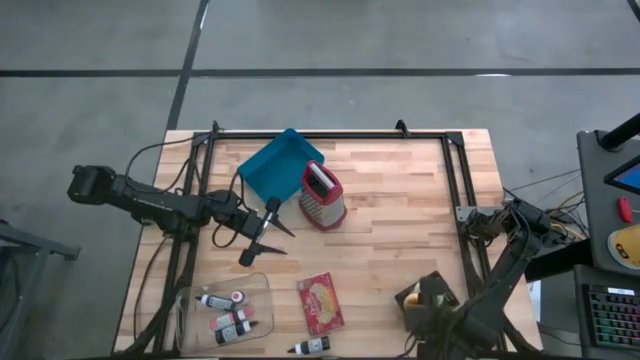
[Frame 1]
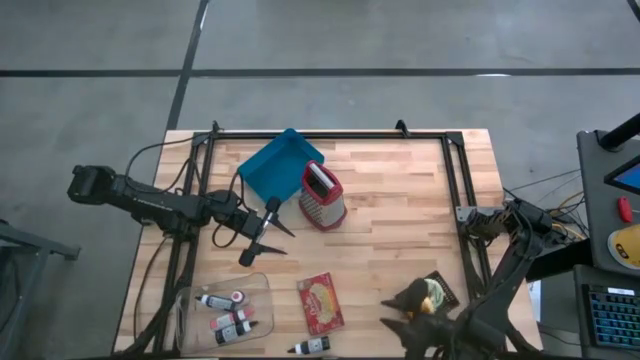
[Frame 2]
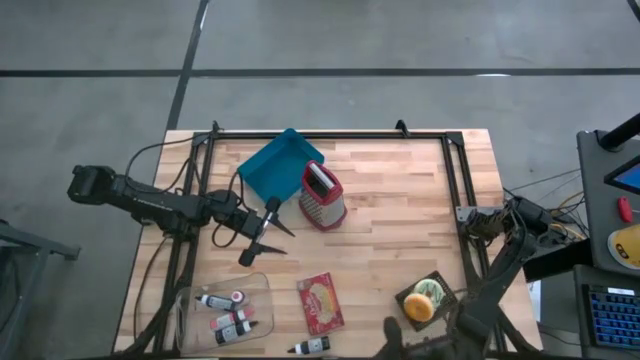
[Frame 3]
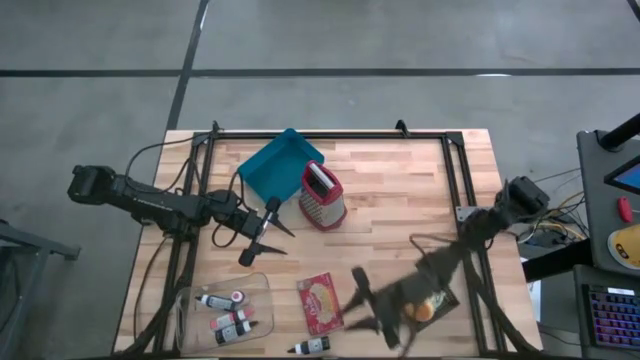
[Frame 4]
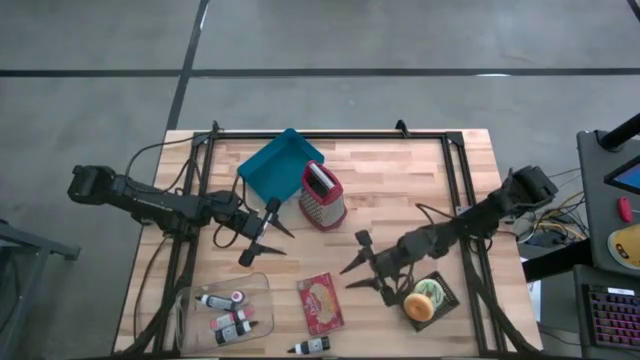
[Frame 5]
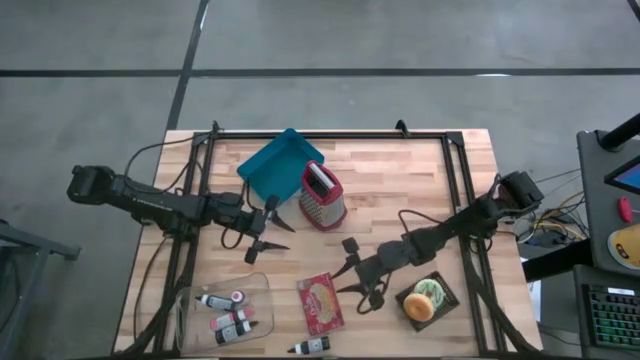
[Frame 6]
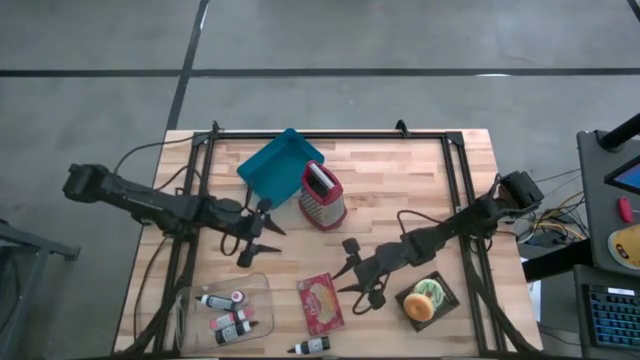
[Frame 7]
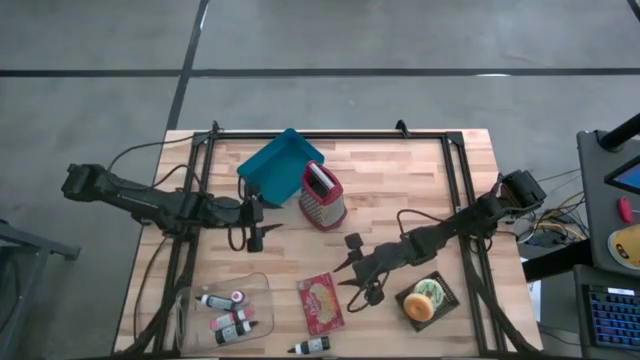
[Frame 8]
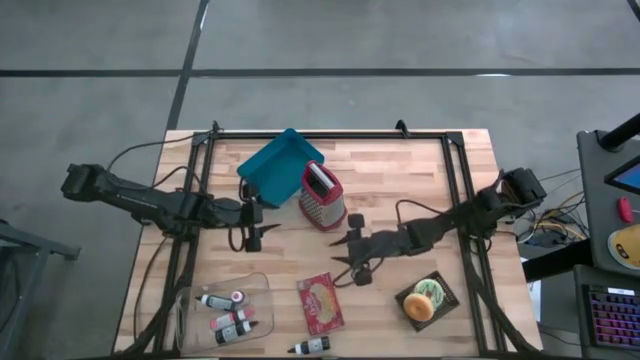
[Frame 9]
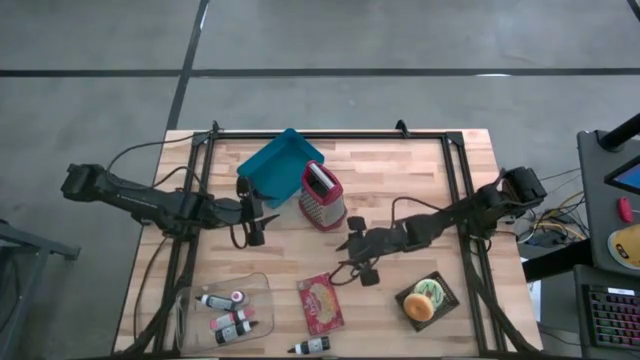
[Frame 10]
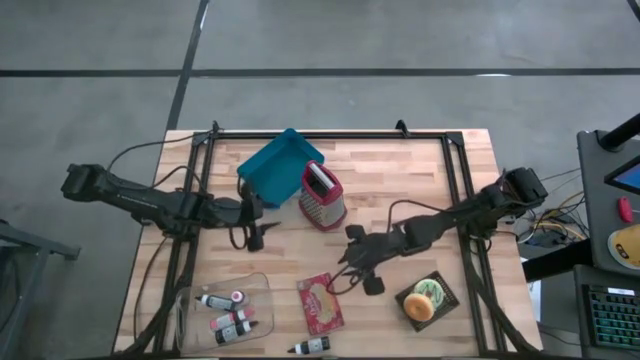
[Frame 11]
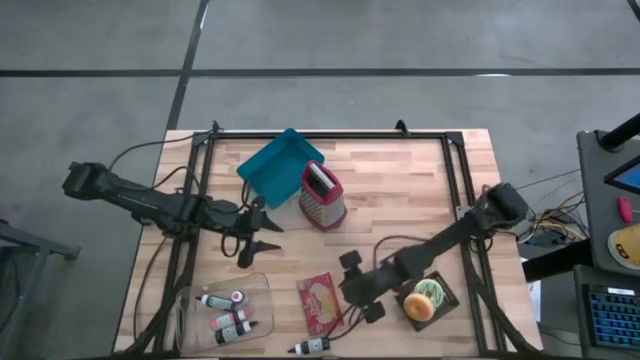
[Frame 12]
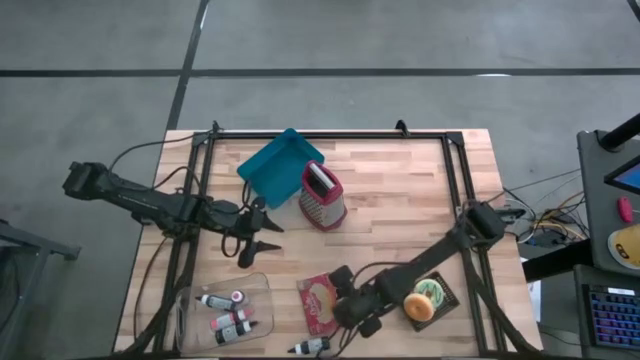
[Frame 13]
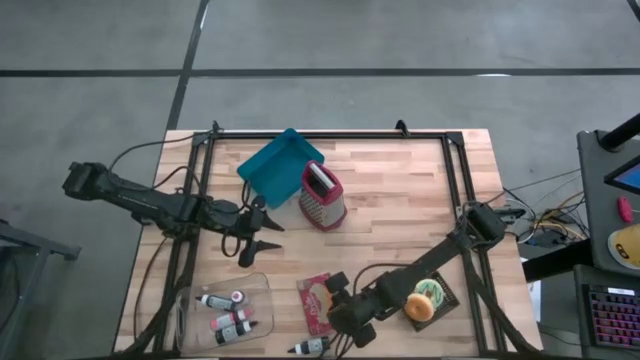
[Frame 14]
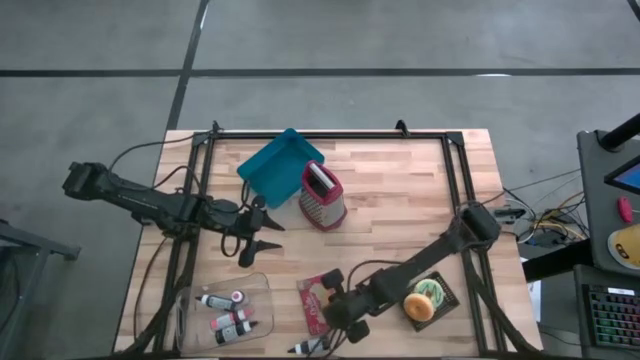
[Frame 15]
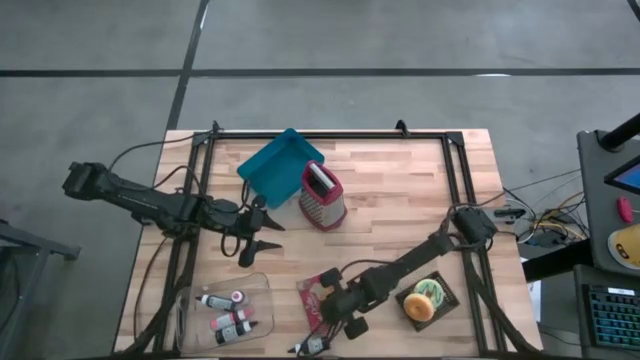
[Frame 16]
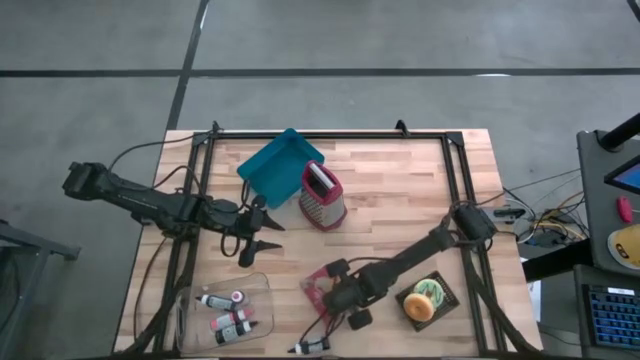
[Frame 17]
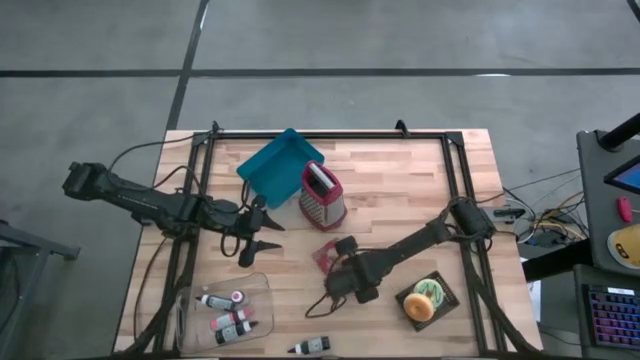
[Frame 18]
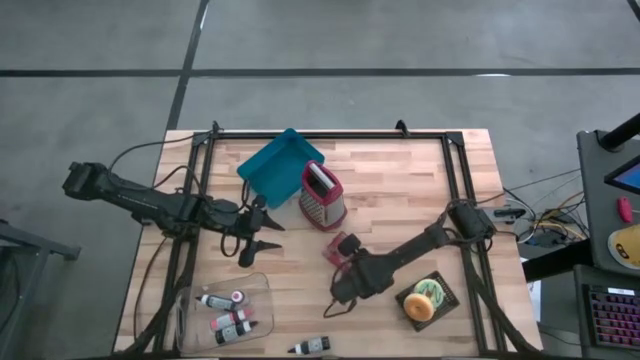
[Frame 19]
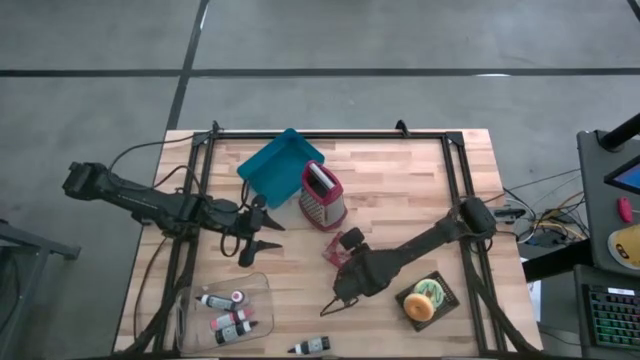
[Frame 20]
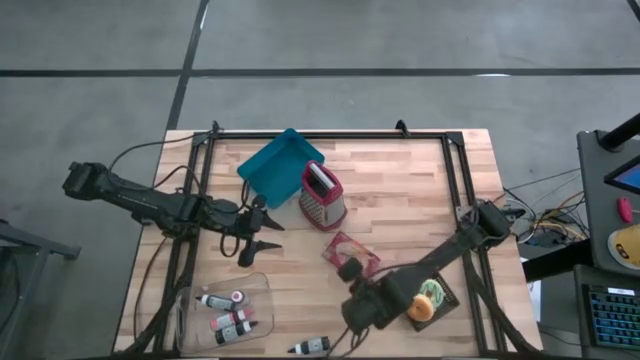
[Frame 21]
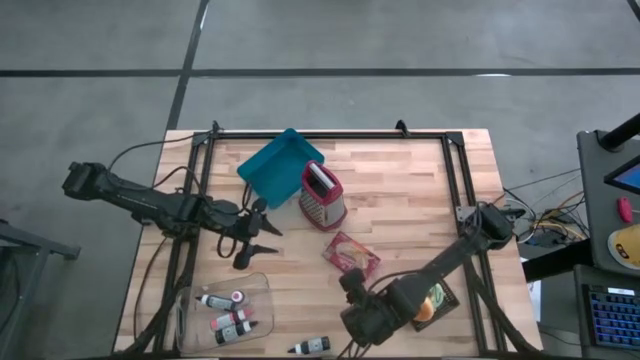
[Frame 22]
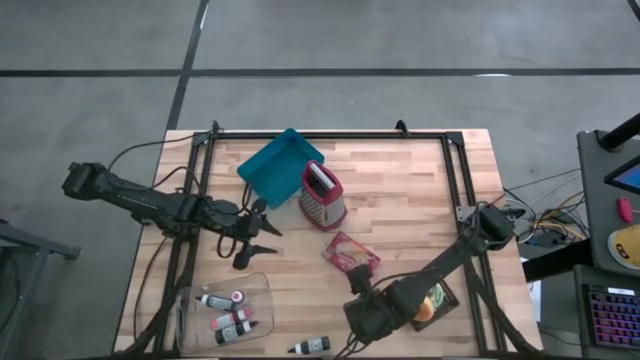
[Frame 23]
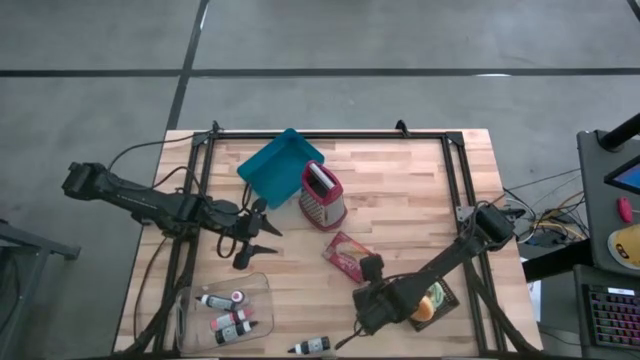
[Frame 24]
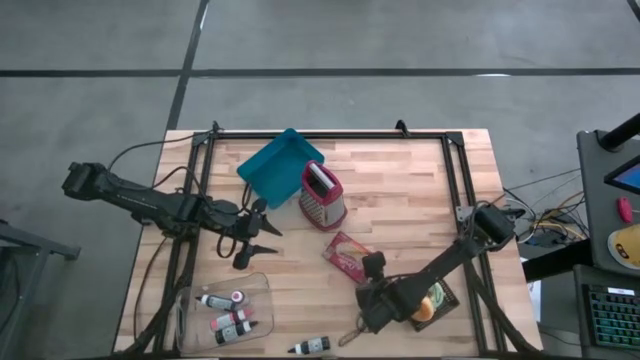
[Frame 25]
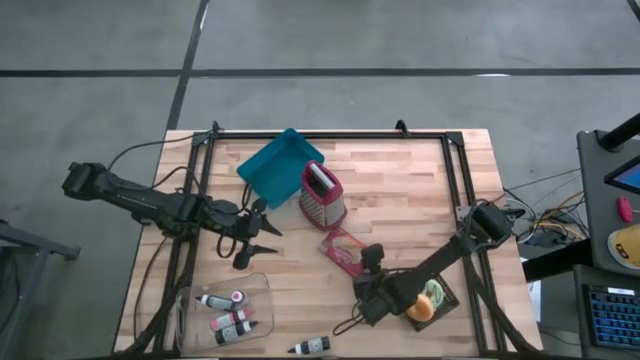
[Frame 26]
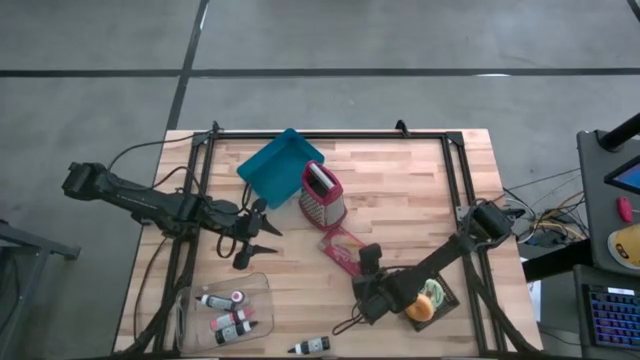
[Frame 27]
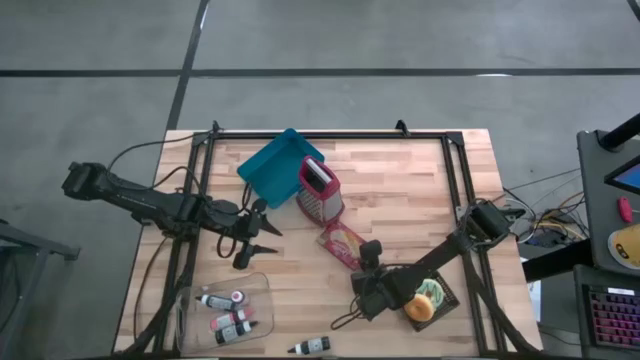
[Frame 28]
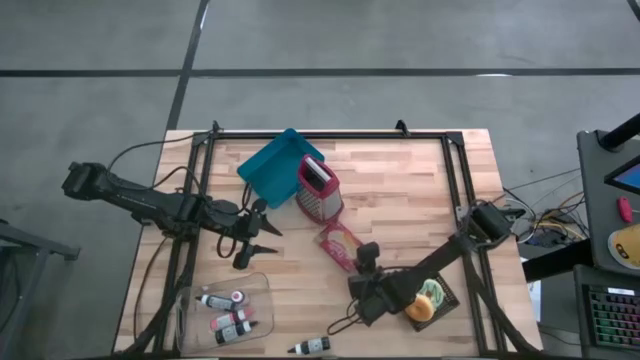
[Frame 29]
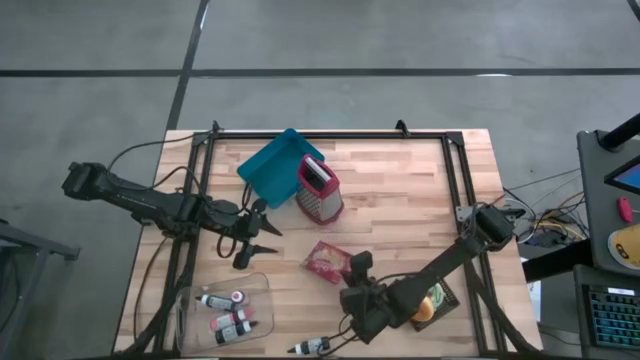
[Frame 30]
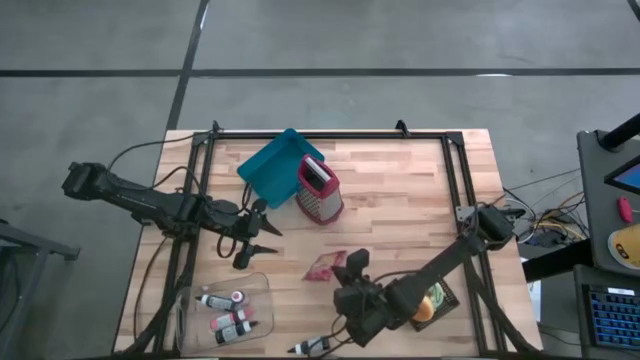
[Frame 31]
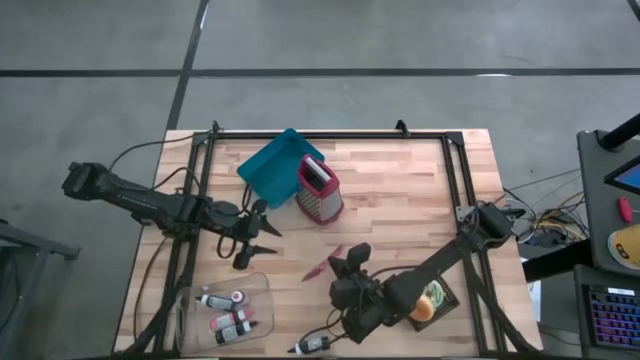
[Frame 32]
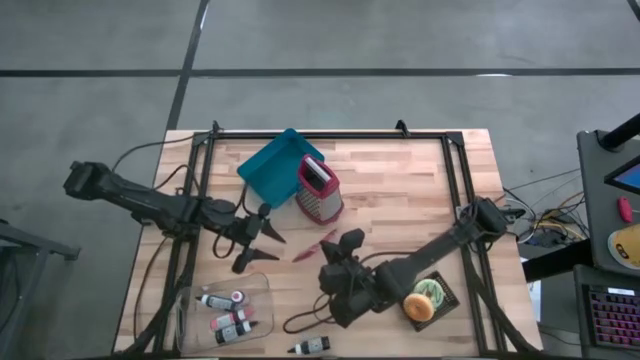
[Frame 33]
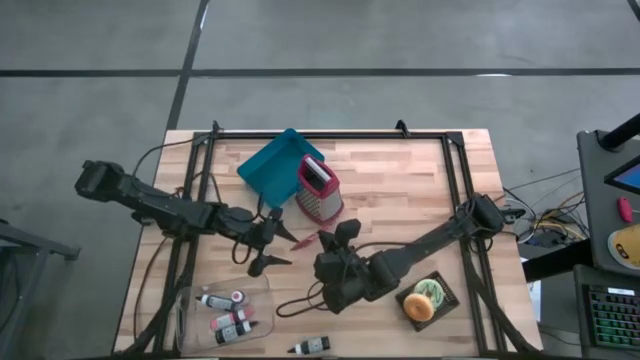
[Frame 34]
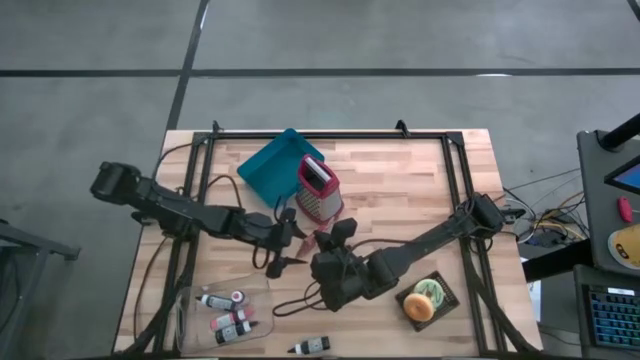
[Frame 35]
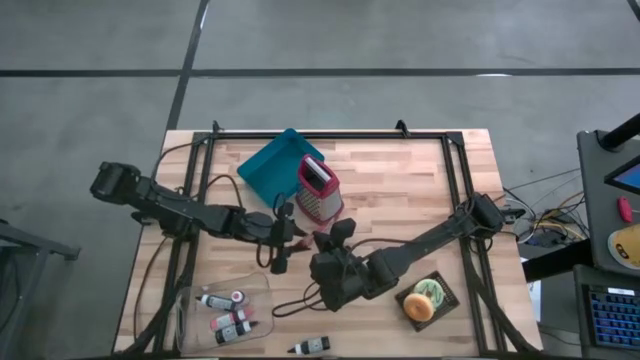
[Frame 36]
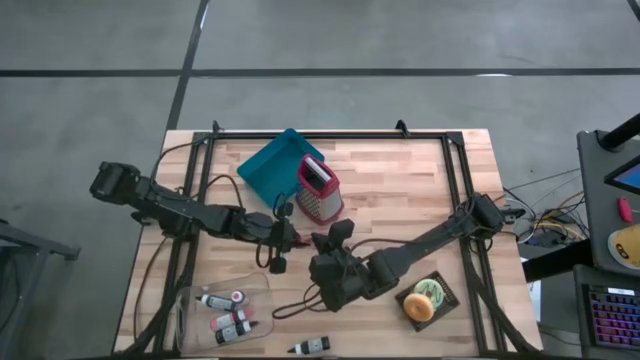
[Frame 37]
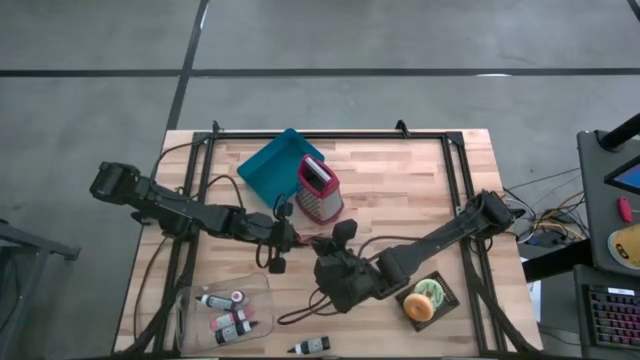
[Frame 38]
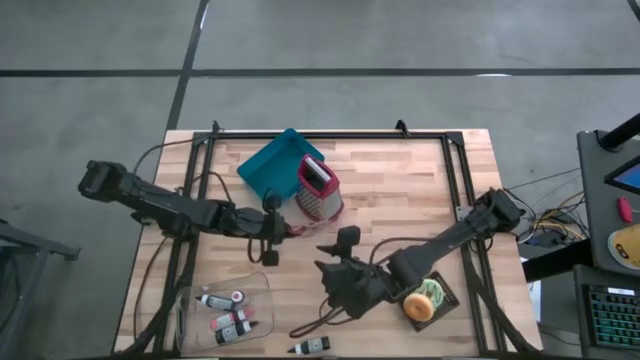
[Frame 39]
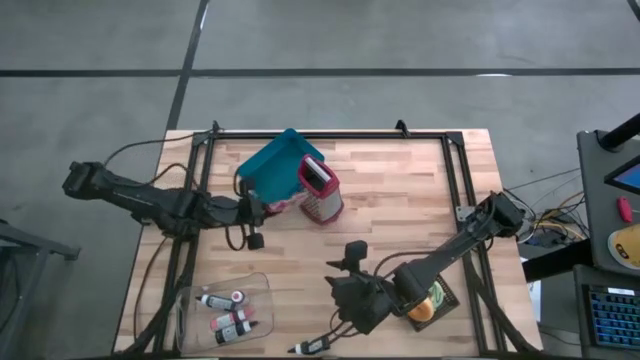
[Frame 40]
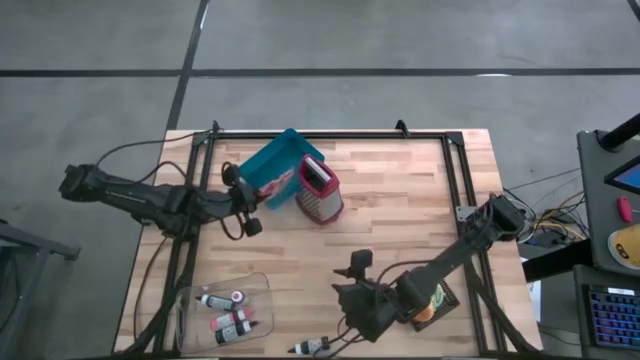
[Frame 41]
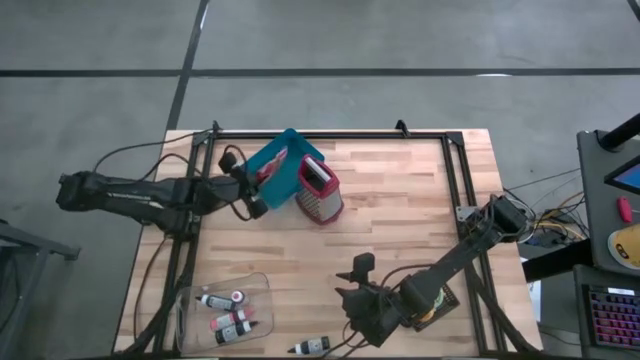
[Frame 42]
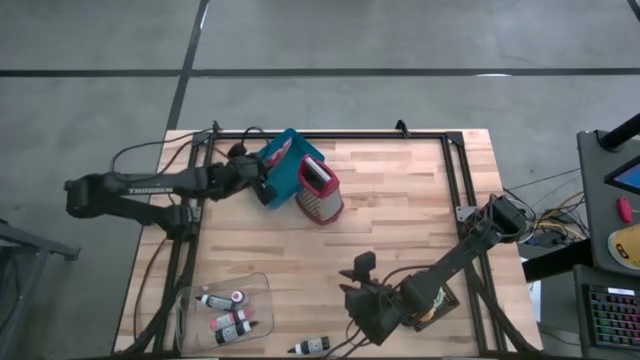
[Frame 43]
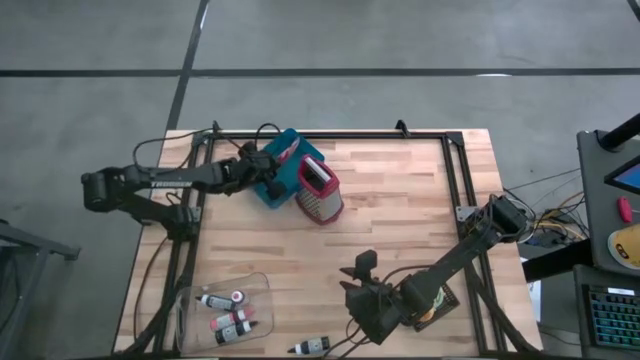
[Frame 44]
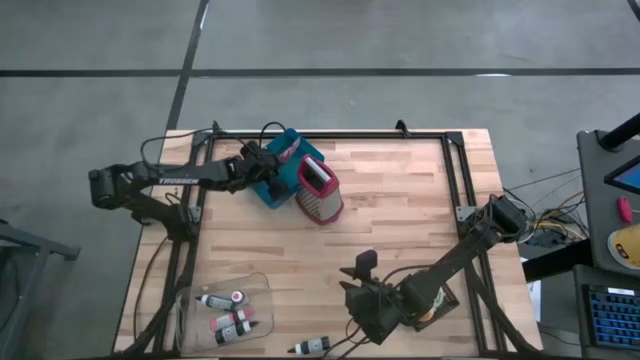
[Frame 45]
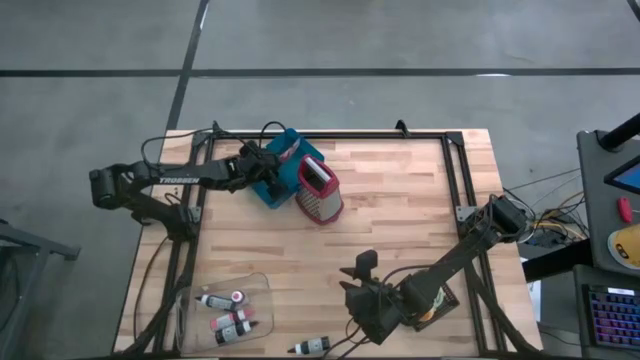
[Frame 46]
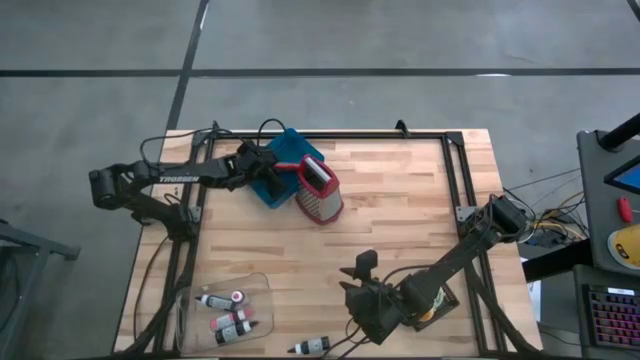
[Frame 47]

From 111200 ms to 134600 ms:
Put the popcorn bag into the blue bin
